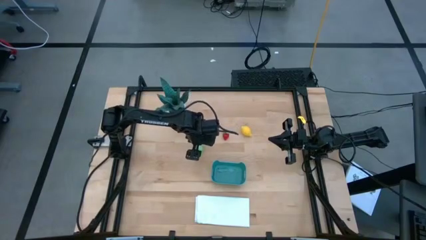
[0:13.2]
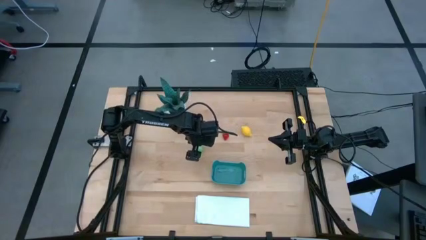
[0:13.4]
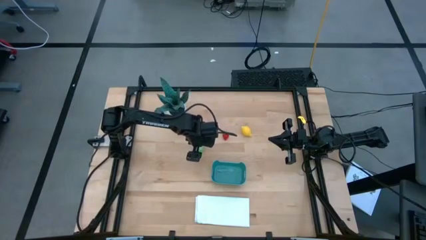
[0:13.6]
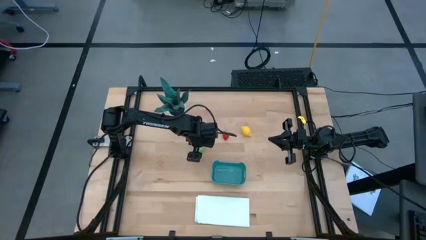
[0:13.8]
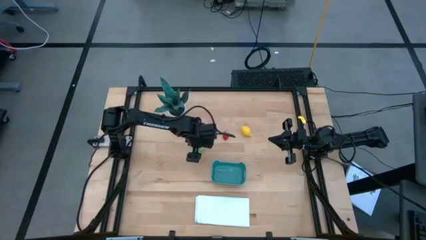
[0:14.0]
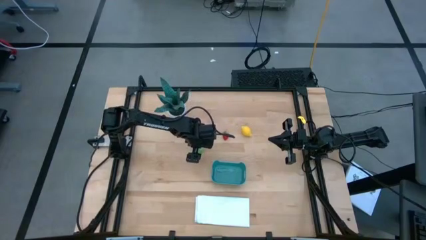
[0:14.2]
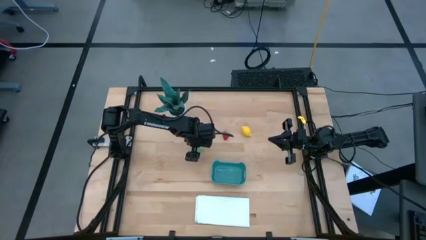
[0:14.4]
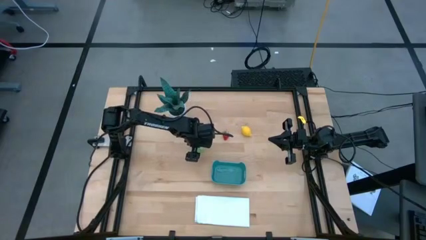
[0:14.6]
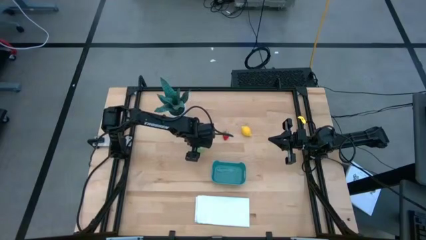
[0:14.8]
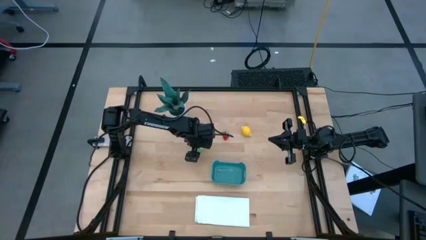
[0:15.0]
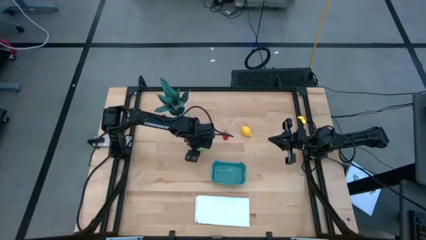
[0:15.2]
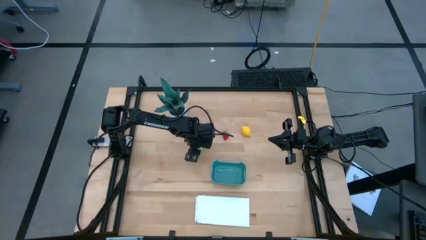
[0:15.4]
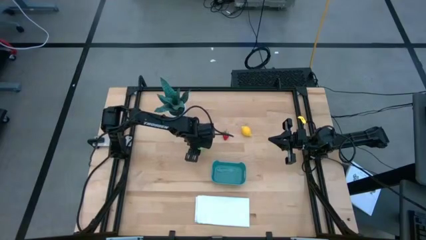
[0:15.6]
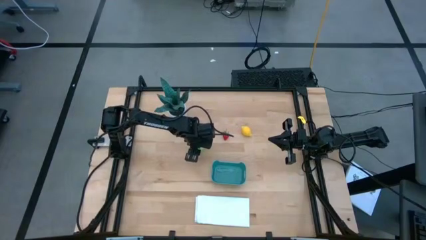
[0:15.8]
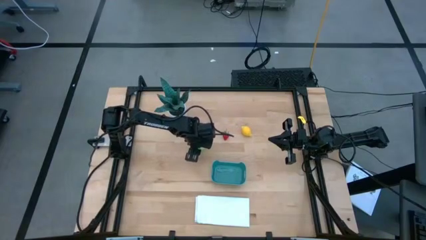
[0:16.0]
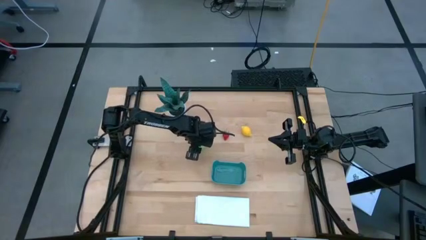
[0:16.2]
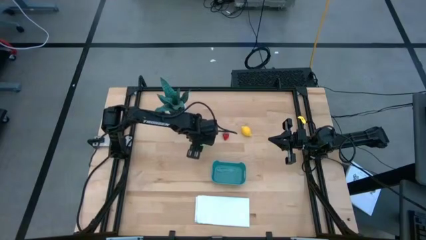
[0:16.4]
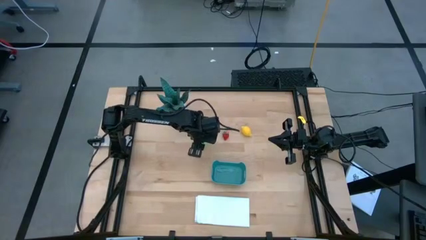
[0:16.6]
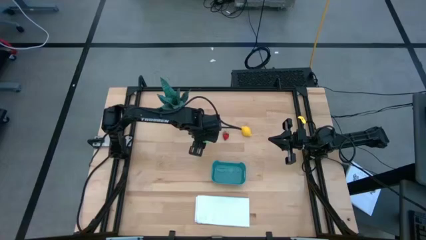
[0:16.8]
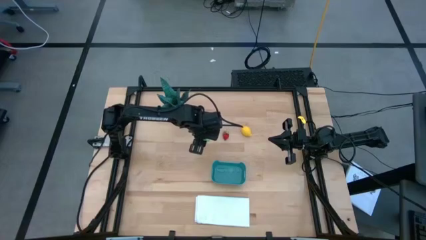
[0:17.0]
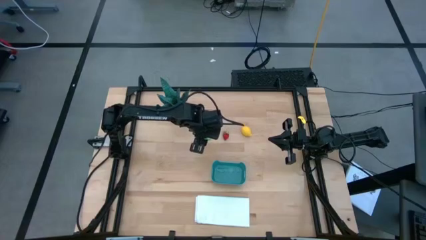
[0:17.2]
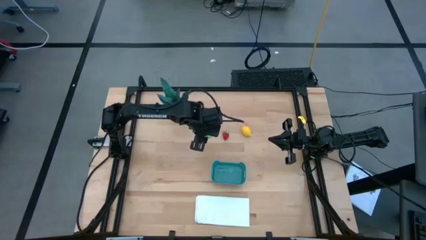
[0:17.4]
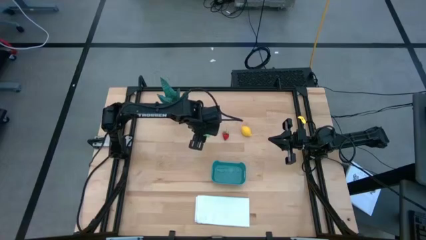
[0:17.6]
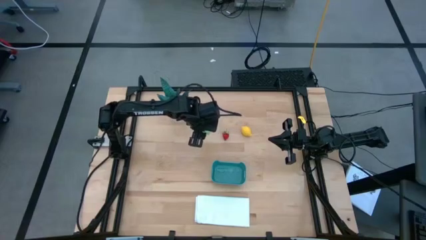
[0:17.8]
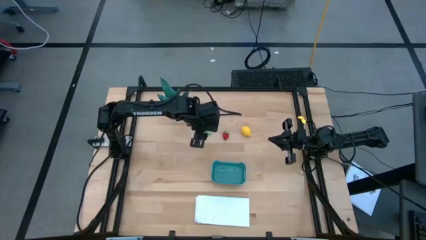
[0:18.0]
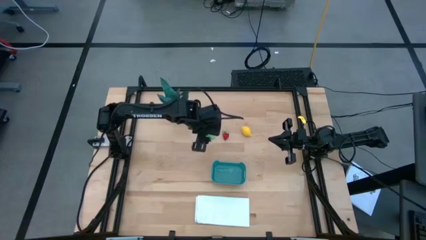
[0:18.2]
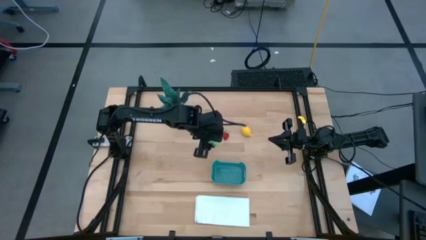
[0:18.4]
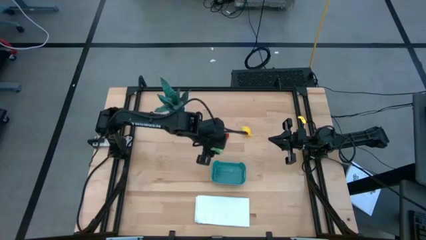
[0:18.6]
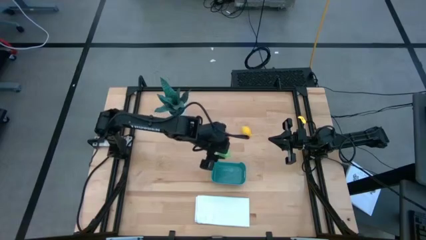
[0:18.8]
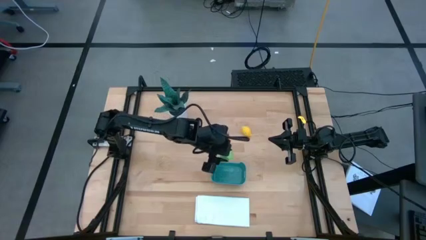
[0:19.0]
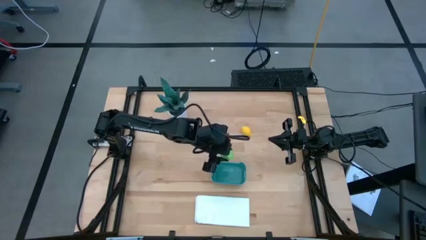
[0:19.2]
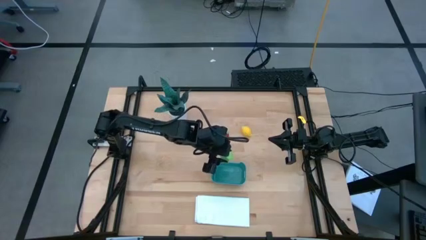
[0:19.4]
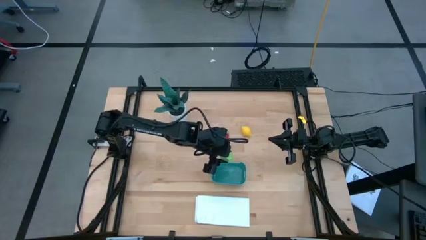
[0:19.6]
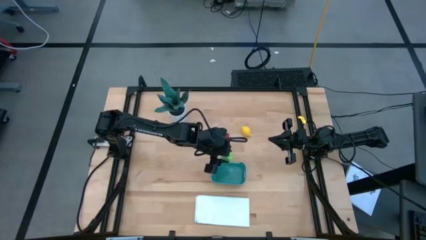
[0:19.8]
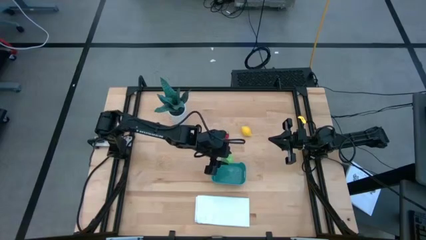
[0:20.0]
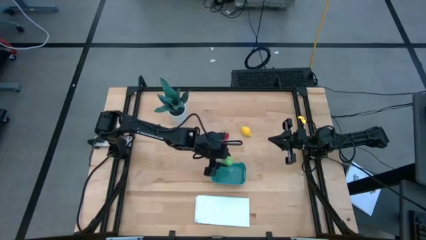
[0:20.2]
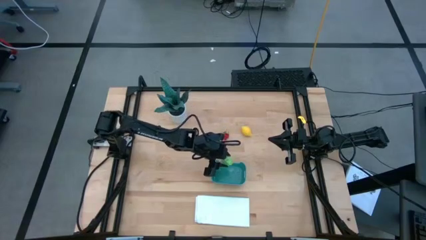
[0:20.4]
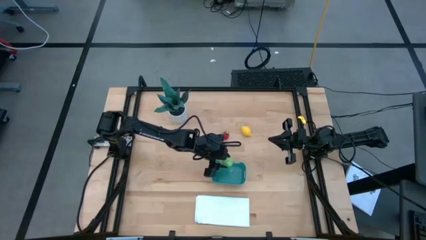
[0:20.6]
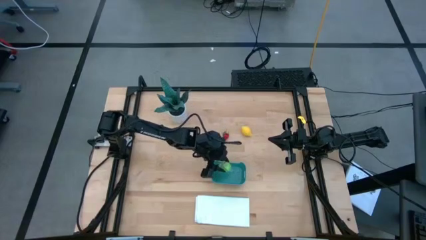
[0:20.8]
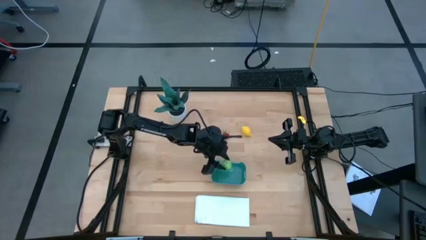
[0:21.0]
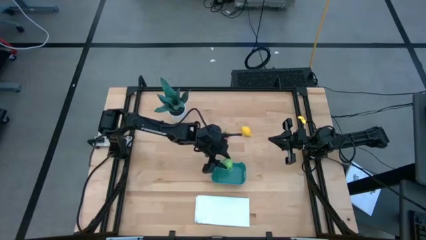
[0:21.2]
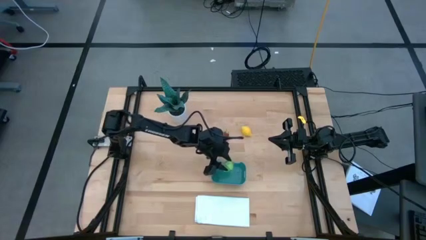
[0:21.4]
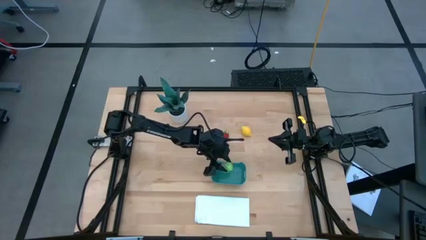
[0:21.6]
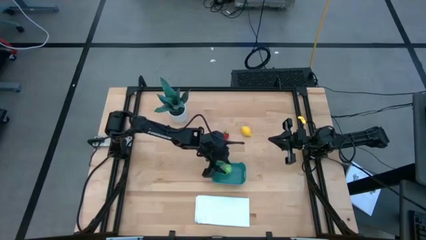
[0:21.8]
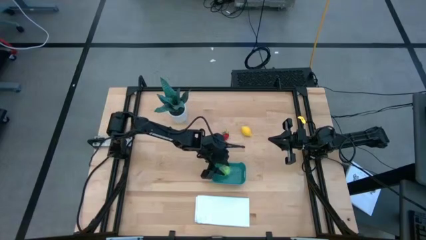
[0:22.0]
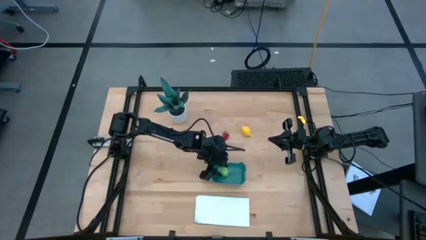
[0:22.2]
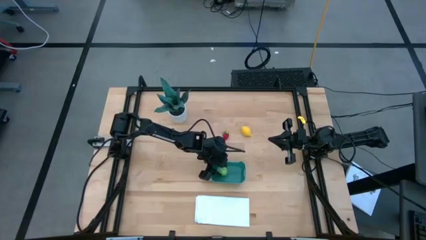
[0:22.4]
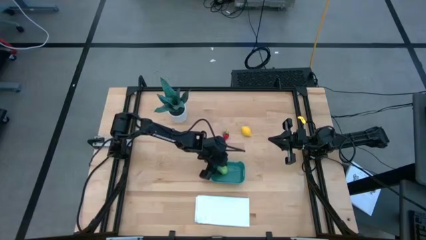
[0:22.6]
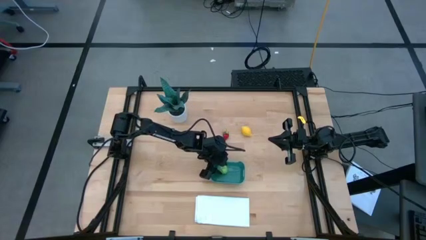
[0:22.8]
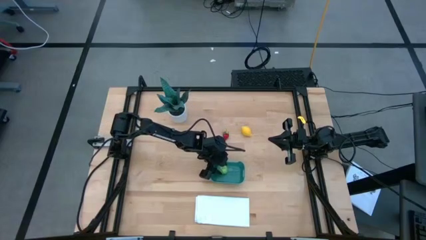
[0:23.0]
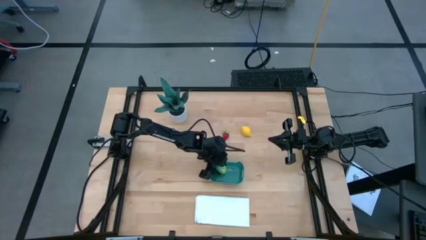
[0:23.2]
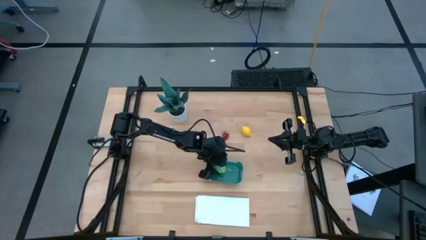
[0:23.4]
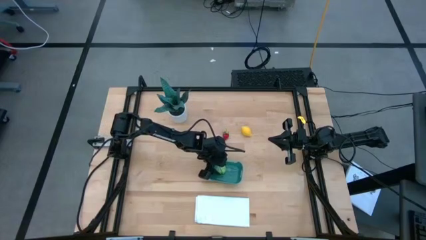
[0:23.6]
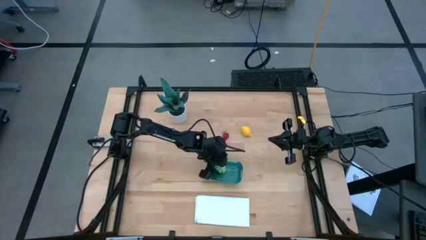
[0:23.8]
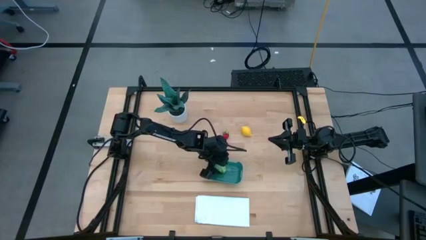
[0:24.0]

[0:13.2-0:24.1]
Task: Pick and placing Produce into tupperware
Put the cabbage into the bin
